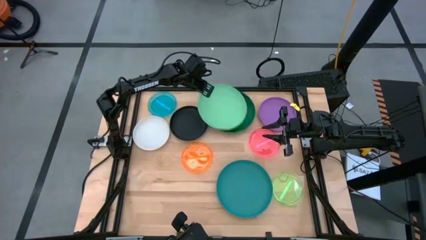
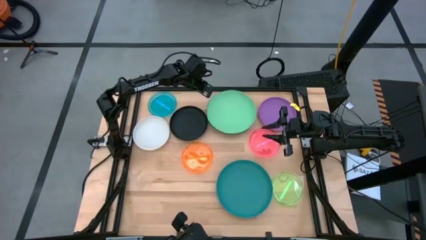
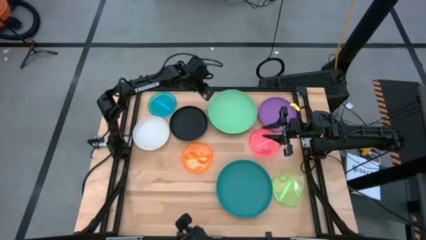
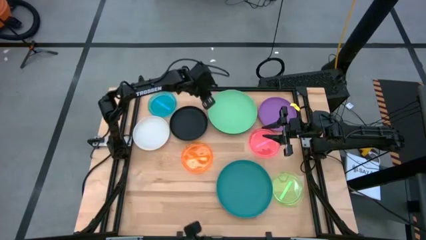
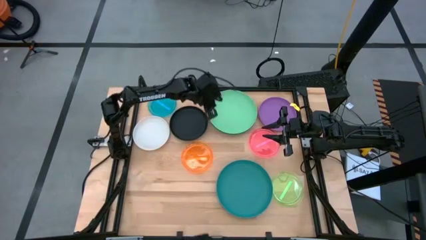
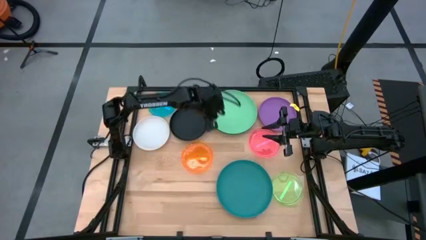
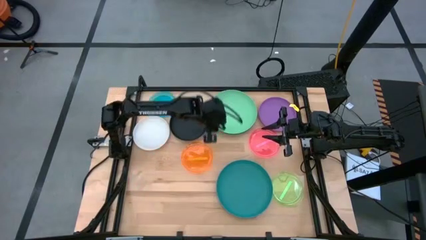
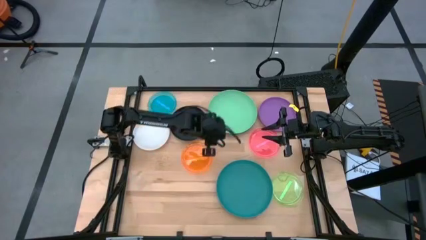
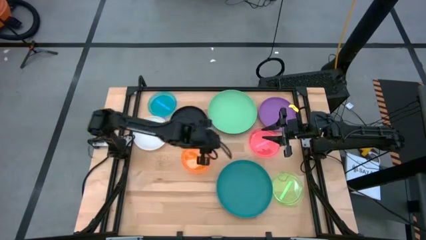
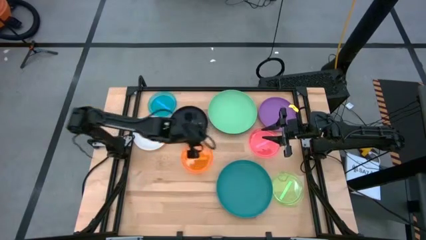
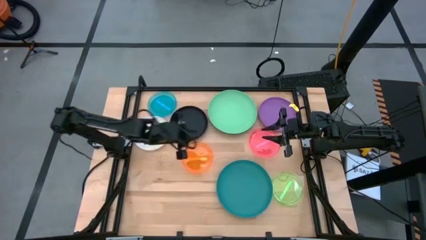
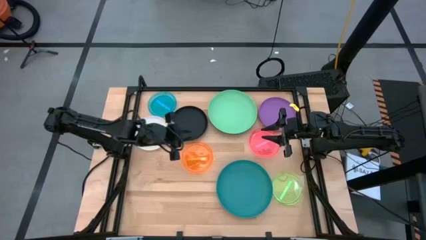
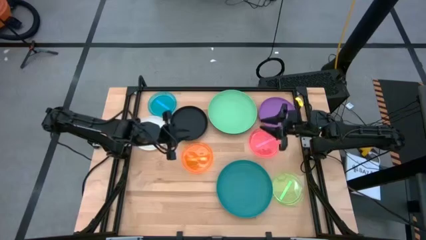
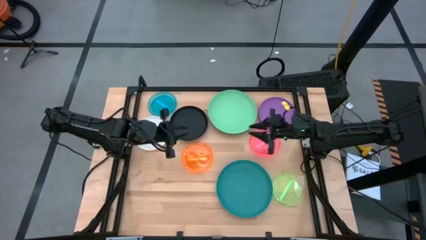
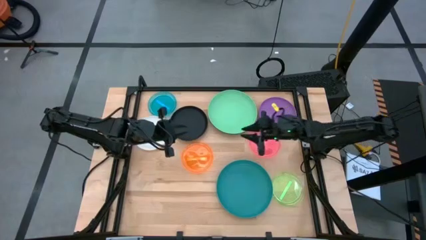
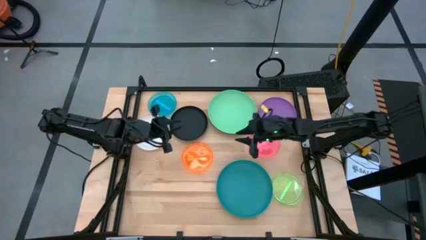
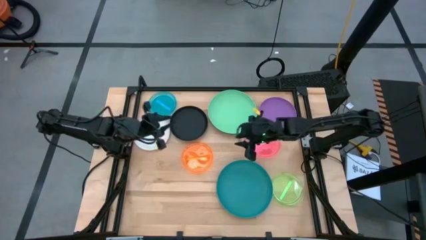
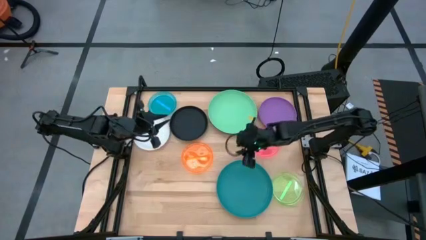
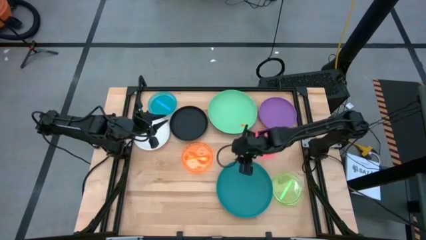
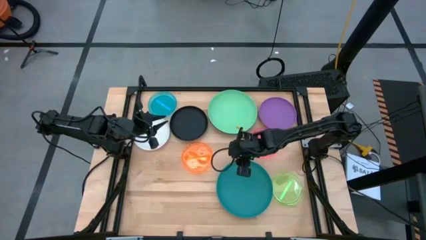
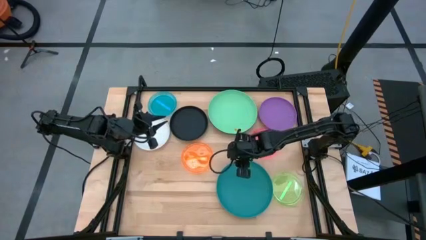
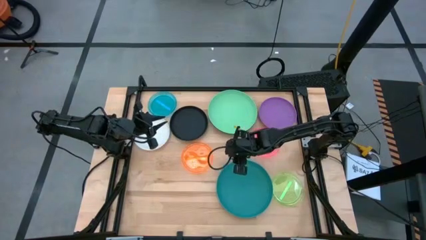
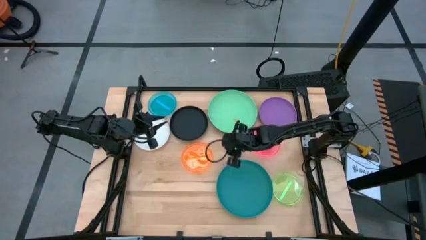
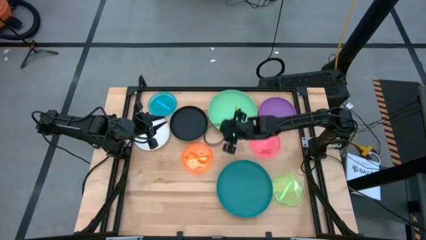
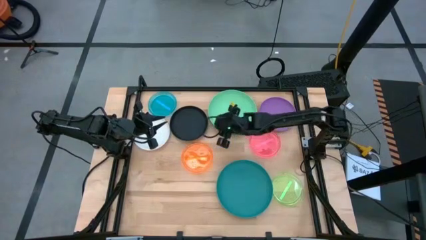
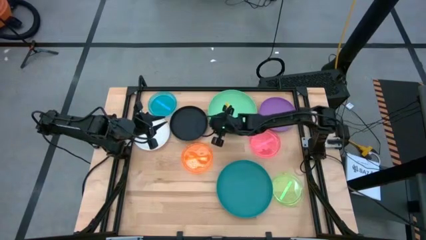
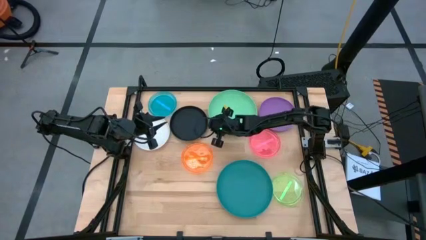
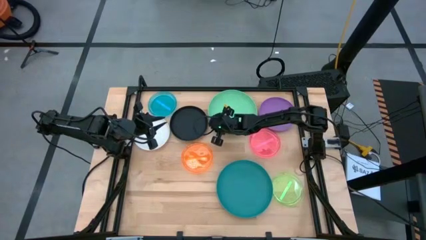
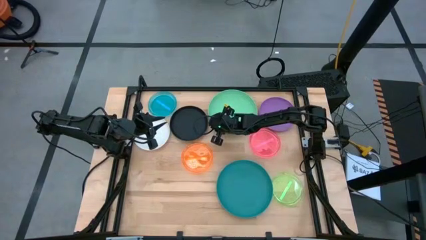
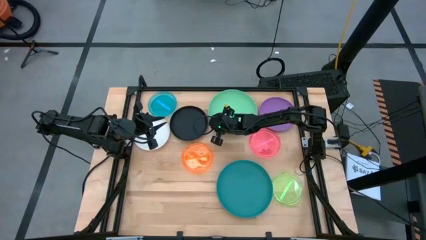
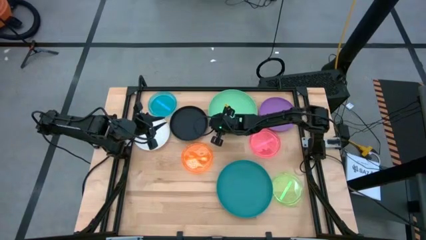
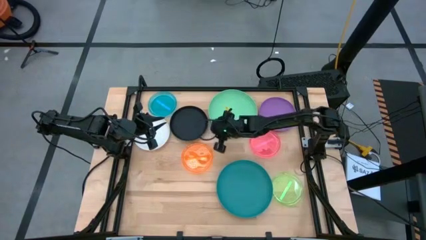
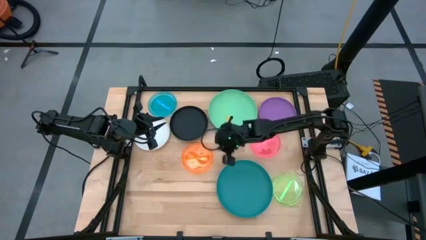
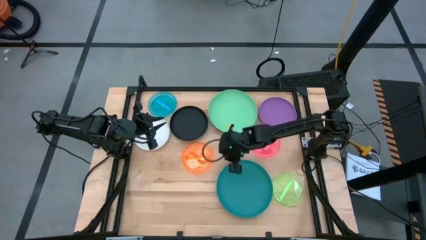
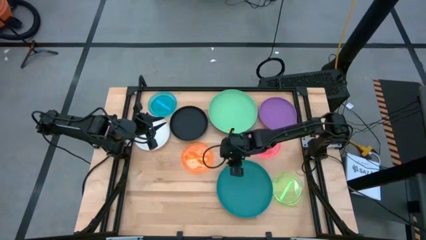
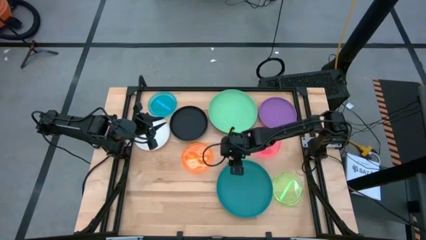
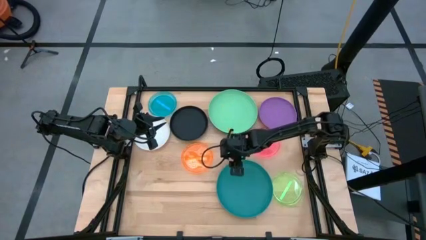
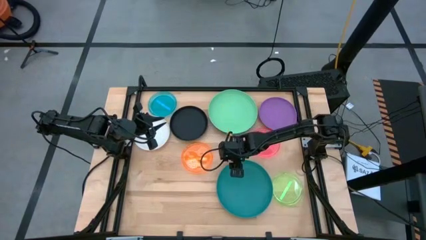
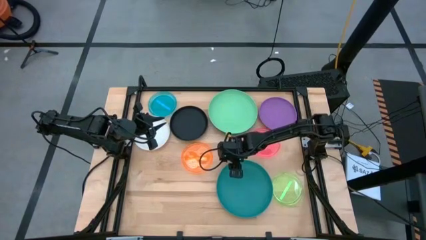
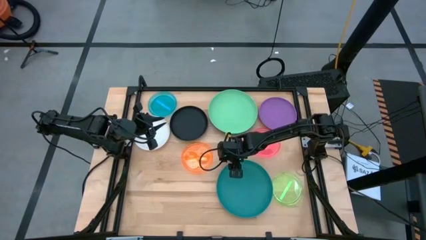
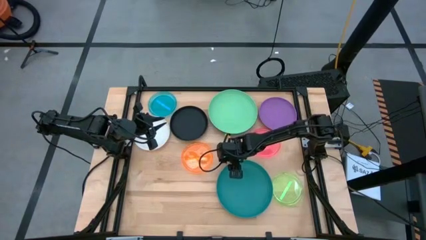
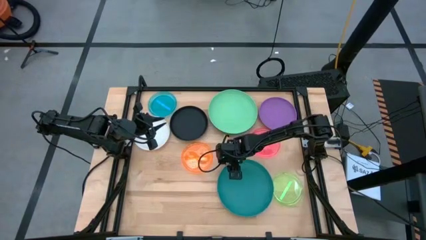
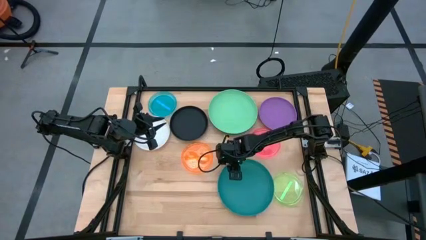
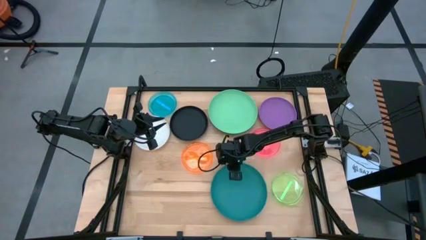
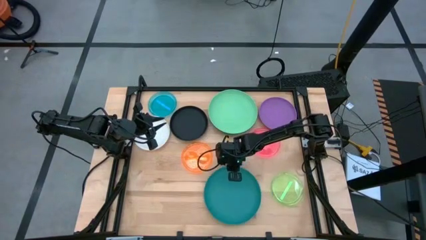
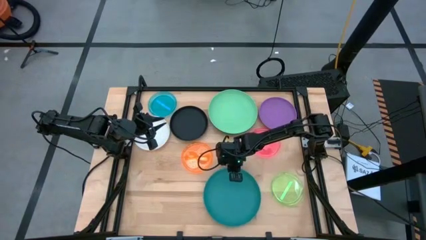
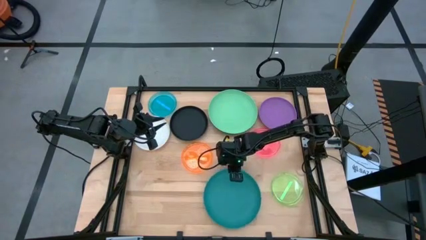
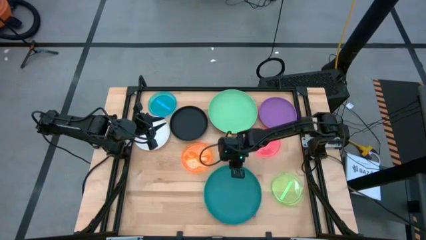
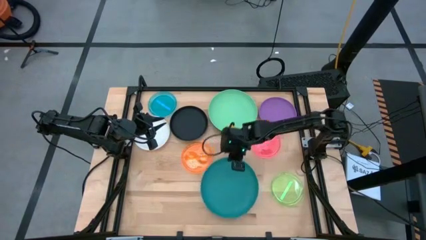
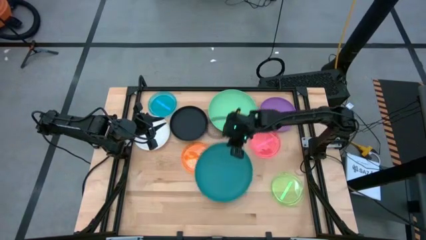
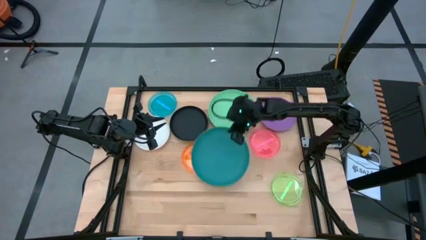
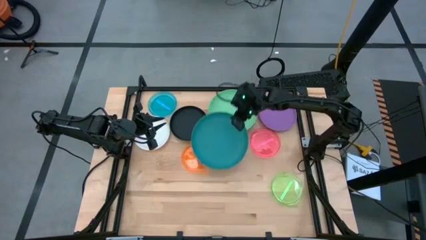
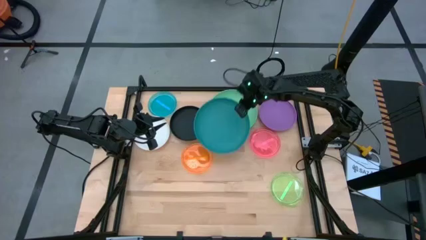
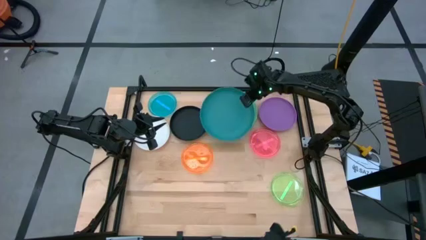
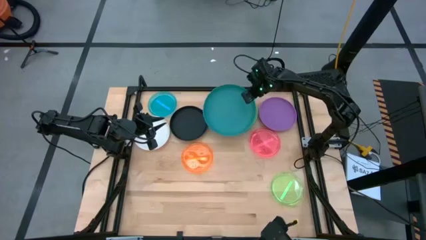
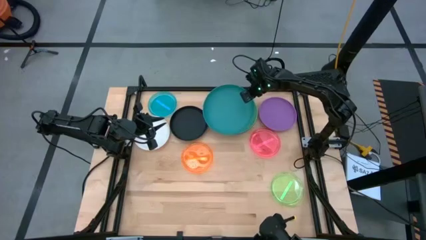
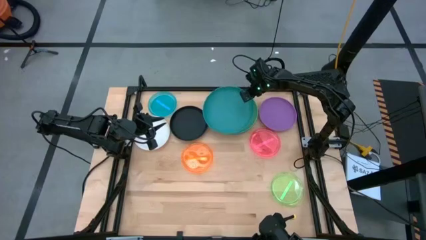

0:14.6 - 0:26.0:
Task: Stack plastic plates
Stack the blue plate on top of the light green plate

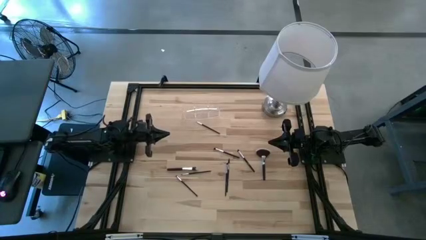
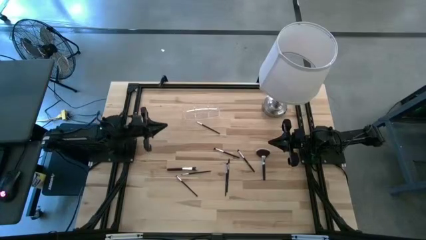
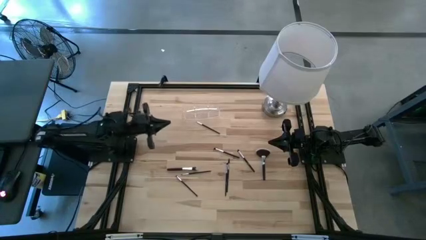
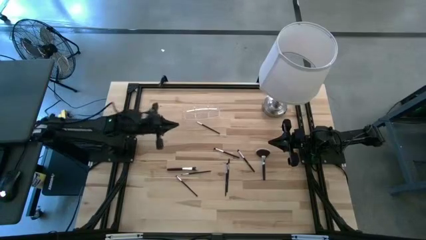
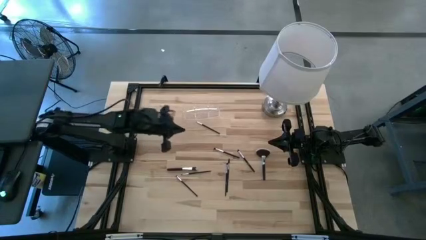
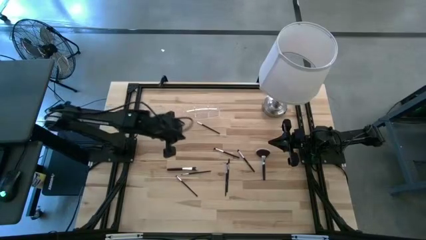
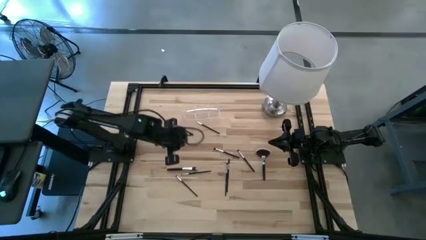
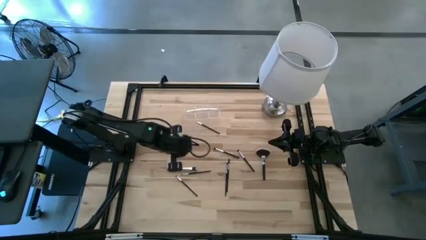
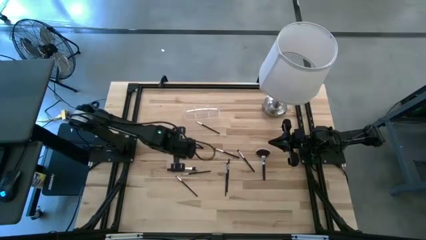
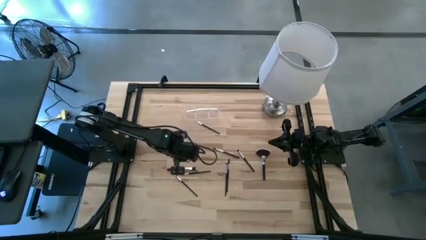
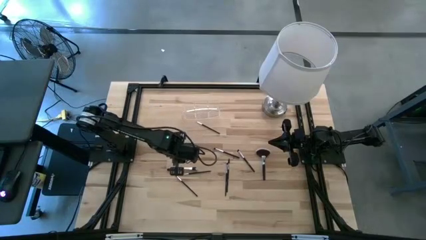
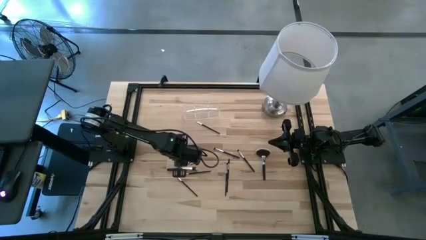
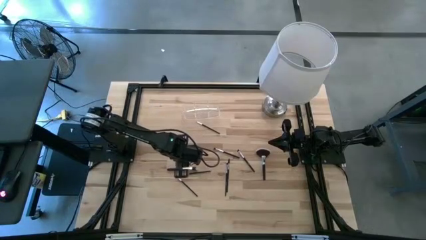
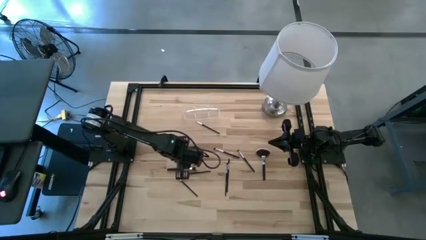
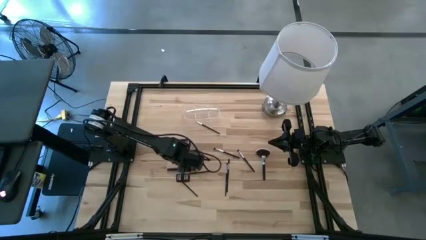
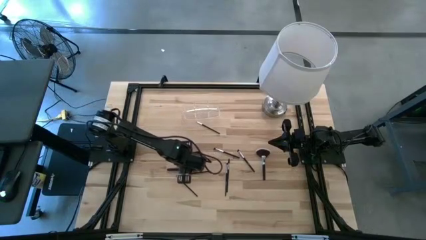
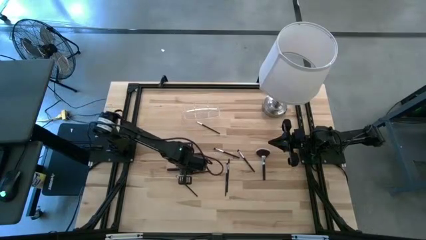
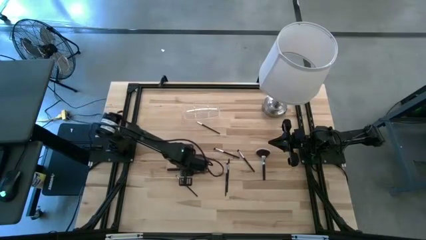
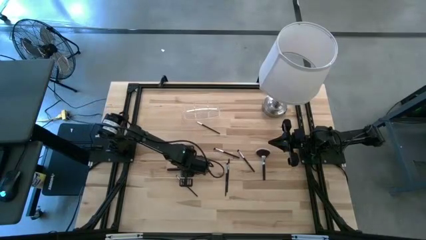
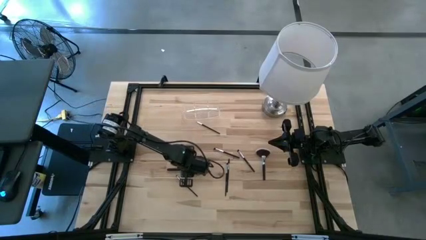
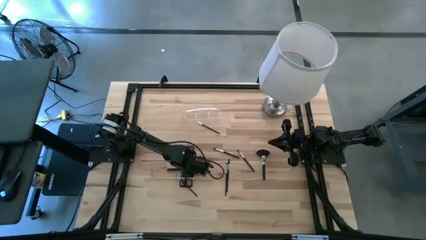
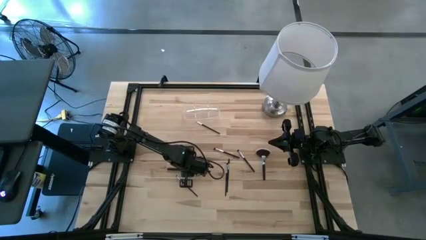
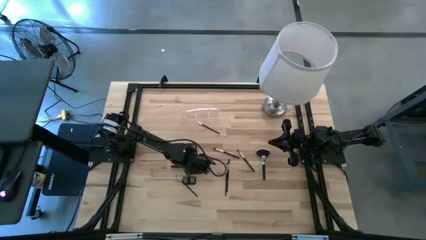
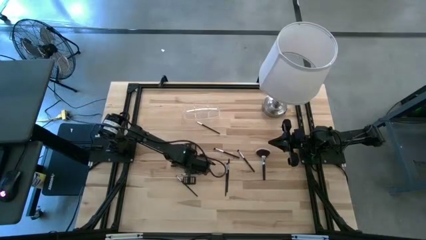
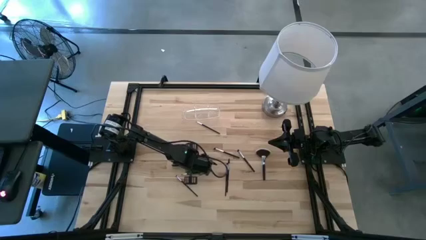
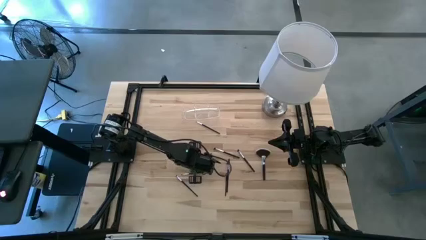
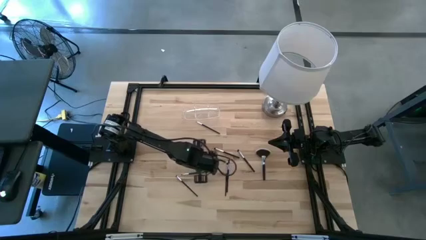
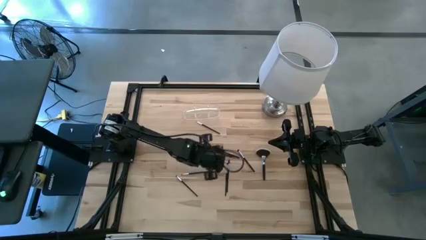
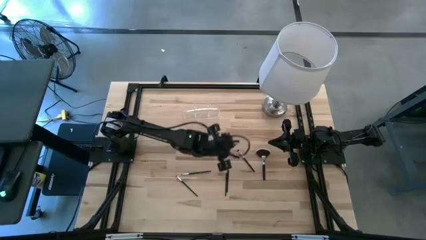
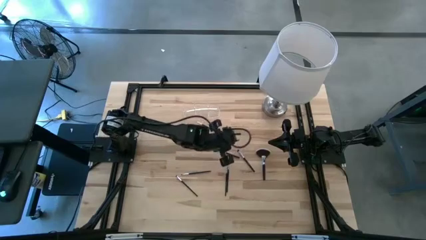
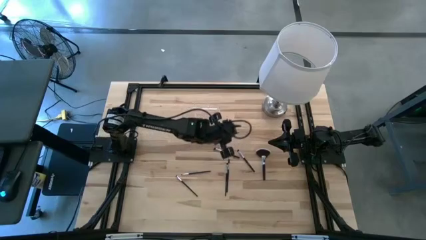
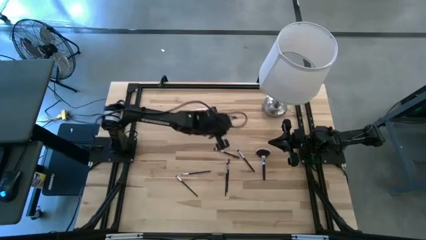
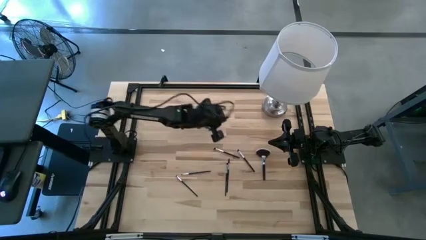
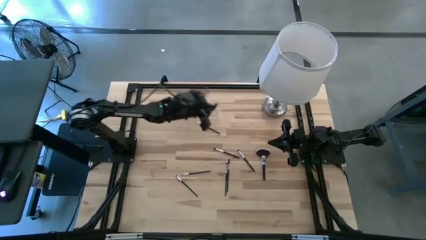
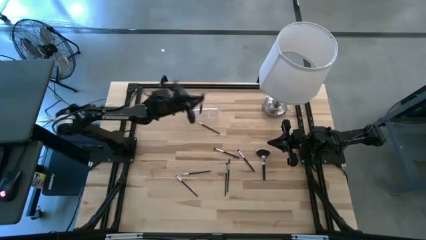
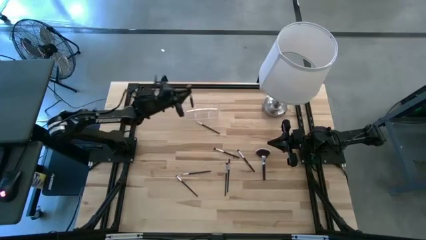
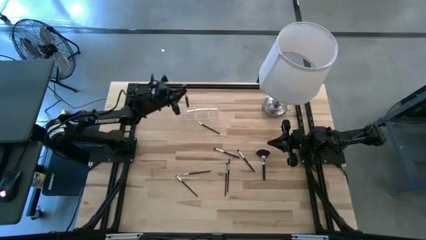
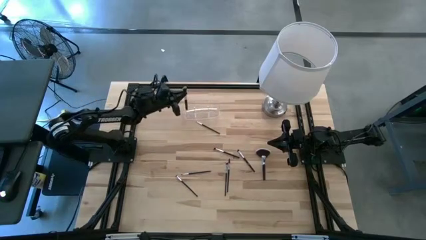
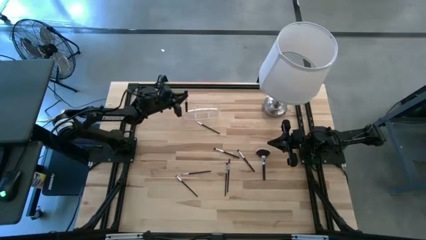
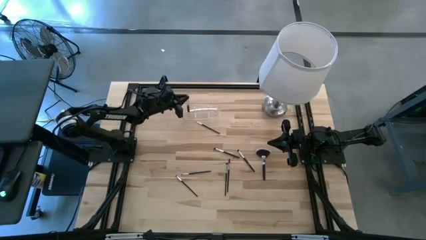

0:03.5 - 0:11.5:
Task: Put items in baskets/containers
Put the powder brush into the transparent organizer
